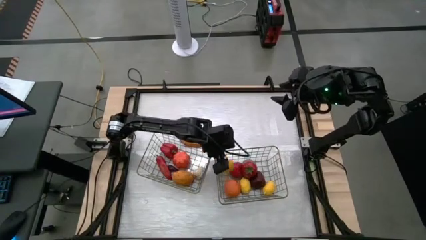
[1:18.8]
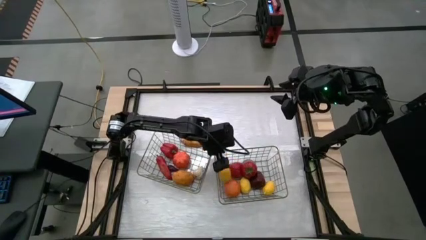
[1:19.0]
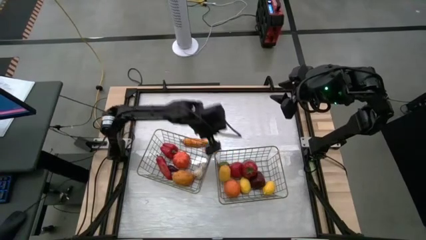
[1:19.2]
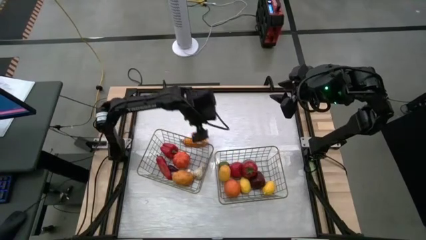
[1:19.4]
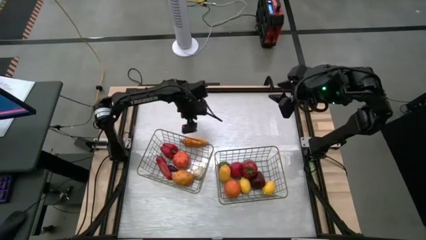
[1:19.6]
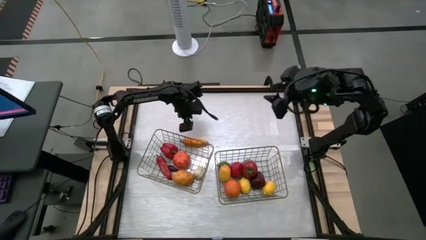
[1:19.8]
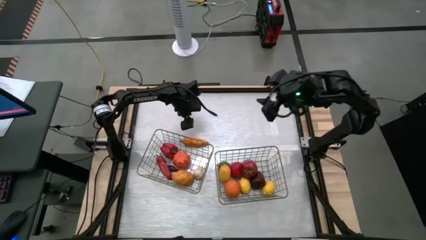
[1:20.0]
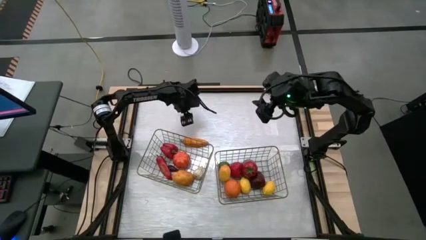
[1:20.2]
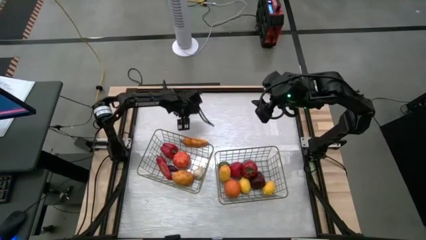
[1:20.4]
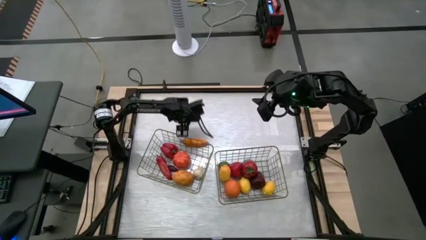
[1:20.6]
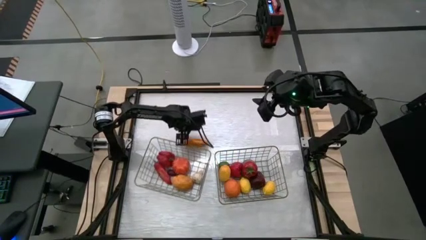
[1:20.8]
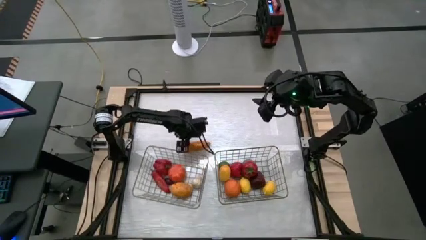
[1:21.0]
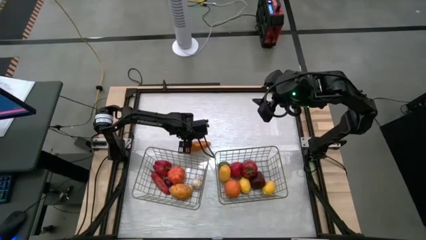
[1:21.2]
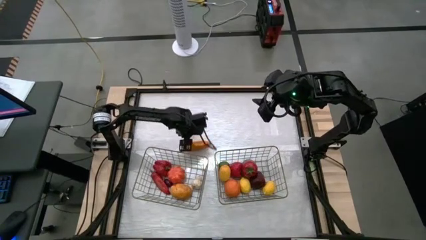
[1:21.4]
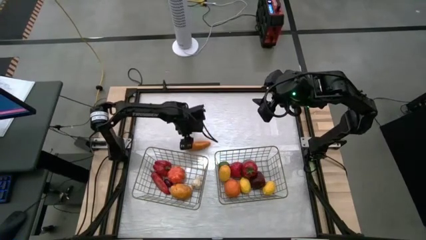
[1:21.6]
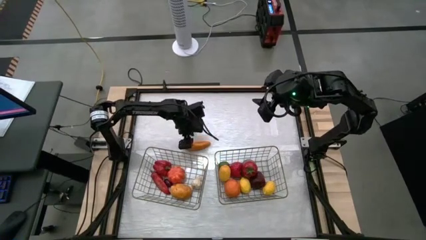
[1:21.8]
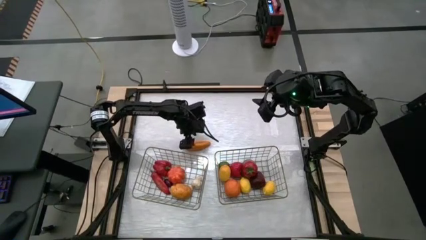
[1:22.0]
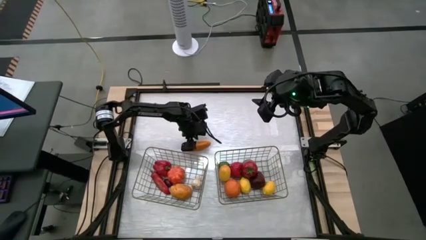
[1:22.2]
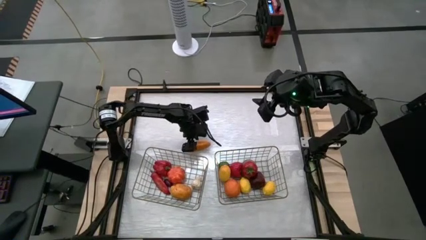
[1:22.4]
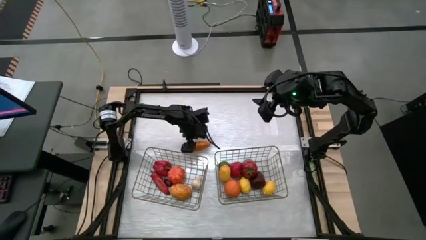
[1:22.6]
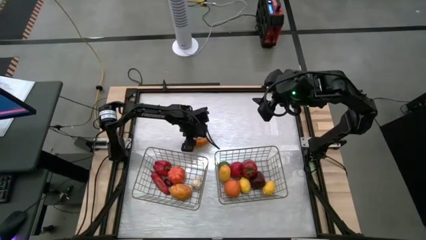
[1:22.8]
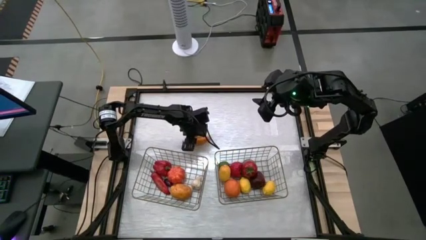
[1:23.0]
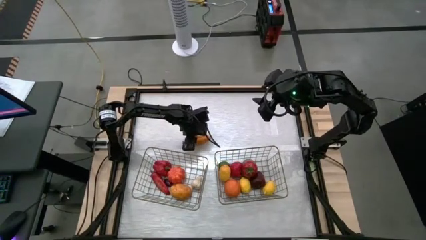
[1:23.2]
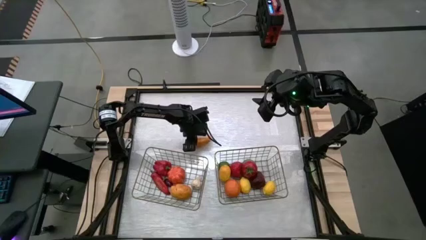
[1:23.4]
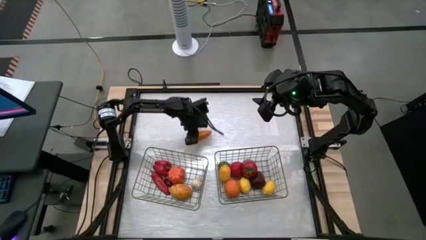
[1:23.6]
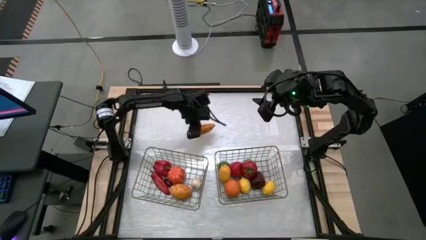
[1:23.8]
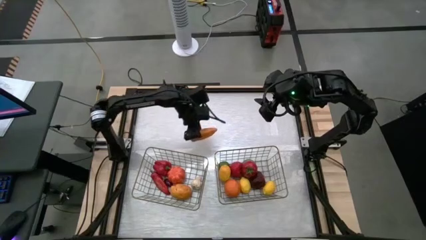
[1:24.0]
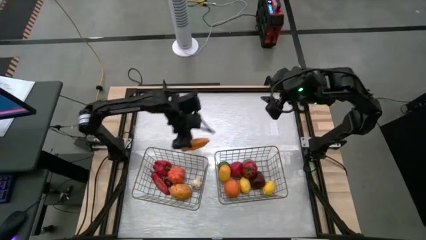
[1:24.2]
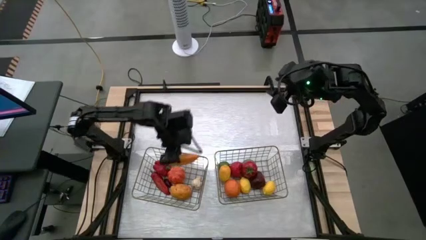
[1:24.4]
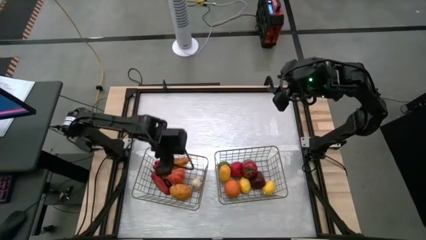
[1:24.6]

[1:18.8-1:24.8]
Task: Sort produce into baskets
Put yellow chili pepper into the left wire basket

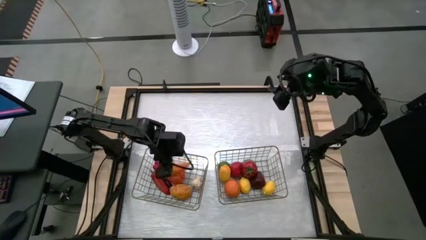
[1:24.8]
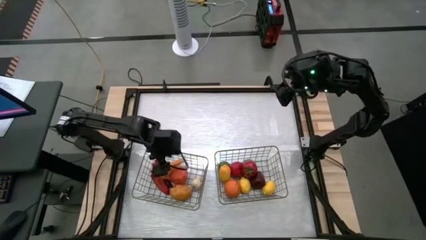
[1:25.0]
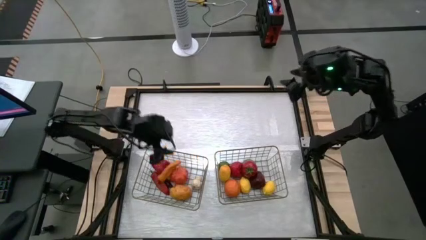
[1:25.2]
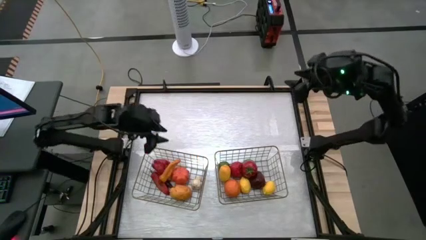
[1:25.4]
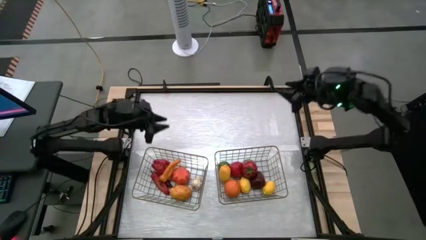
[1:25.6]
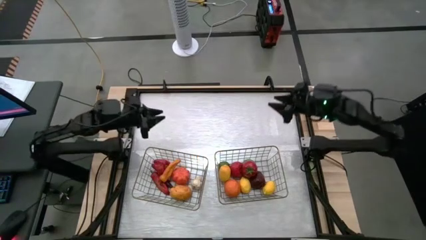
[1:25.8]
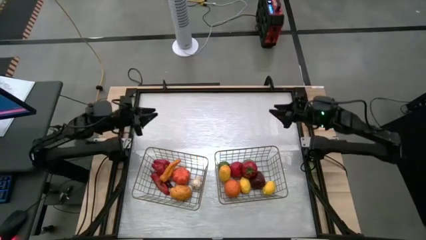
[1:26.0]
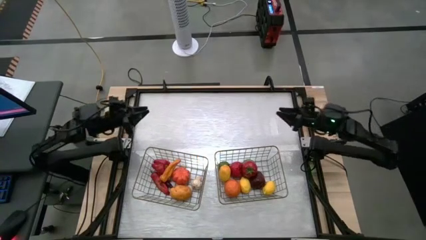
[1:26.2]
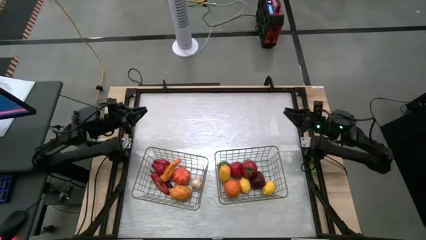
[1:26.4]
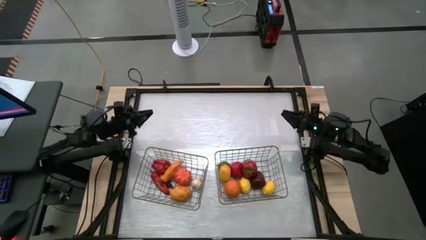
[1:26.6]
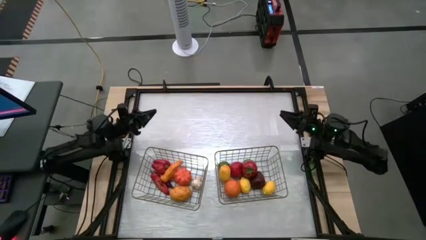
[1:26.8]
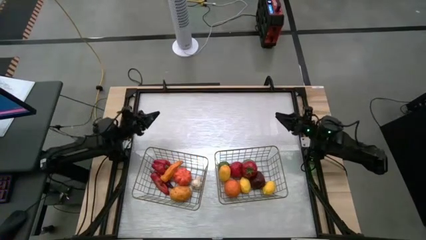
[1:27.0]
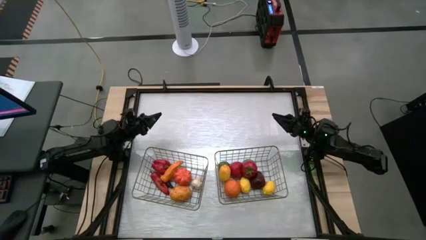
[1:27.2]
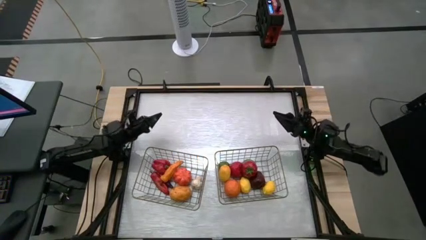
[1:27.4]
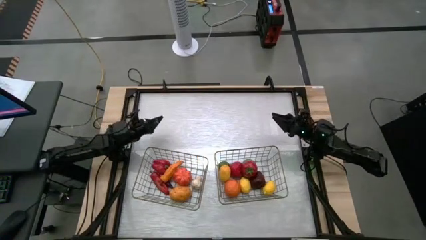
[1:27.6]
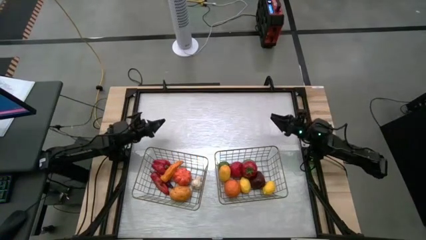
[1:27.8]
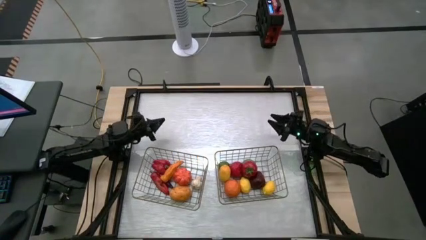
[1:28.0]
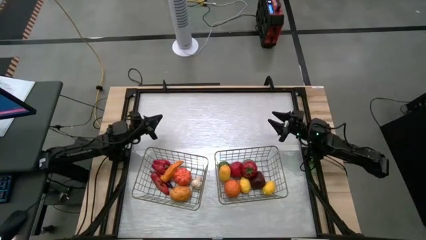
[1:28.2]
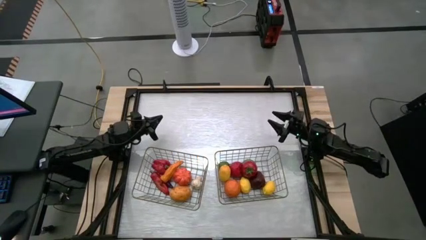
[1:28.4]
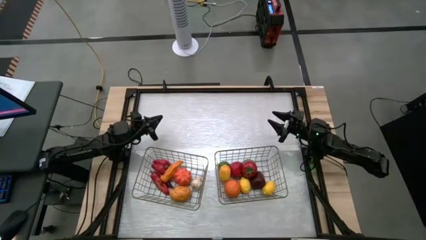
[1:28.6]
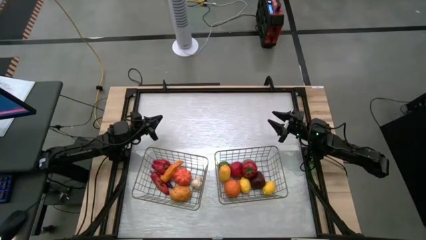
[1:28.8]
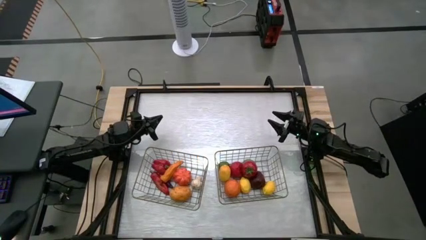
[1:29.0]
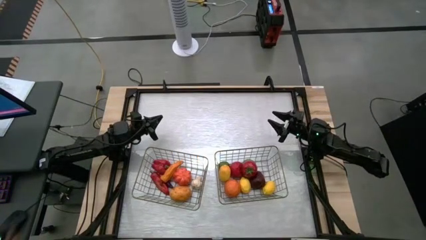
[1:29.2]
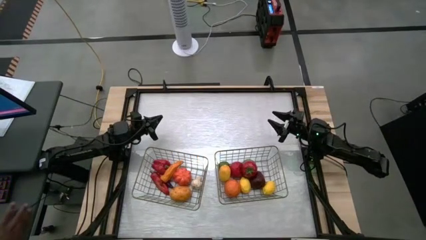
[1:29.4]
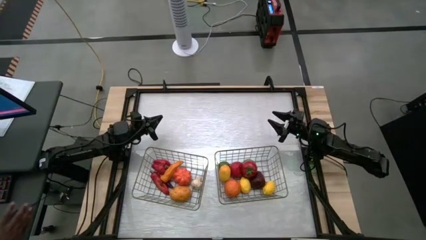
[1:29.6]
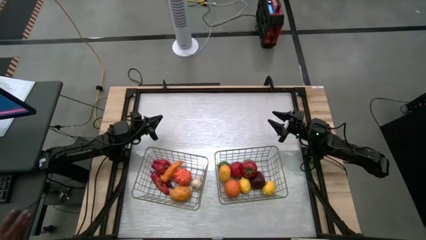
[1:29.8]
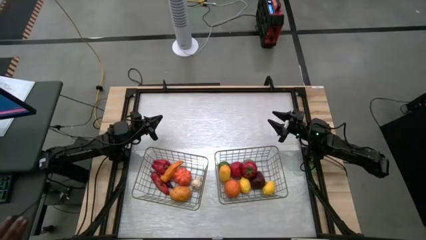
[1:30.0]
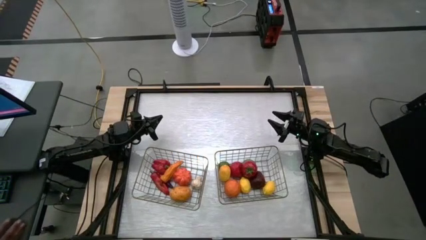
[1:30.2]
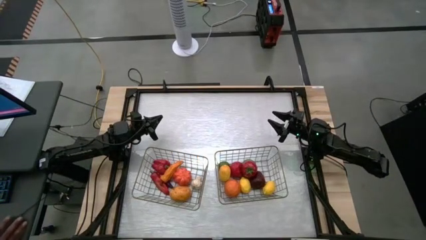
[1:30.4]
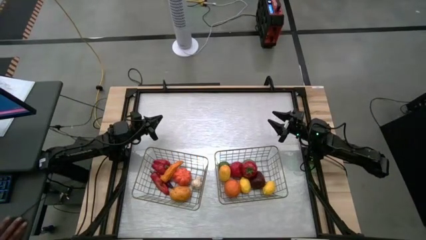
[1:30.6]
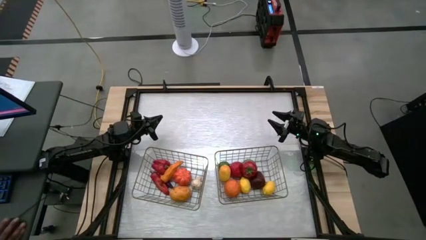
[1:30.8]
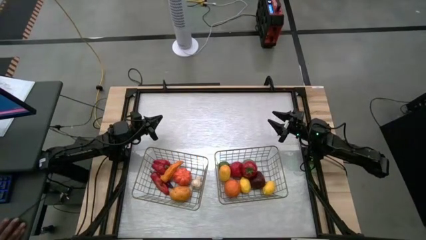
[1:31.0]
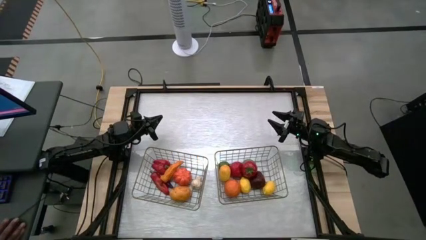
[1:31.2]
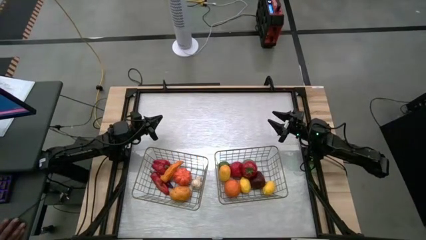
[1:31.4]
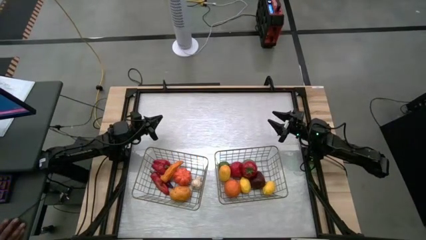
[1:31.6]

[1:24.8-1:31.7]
Return to Home Position
